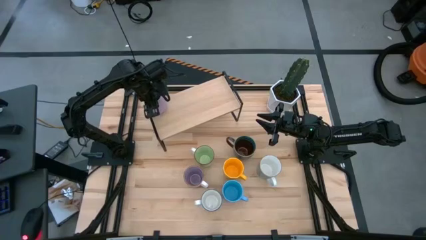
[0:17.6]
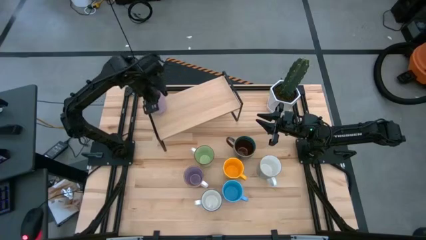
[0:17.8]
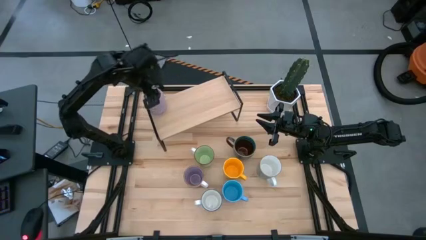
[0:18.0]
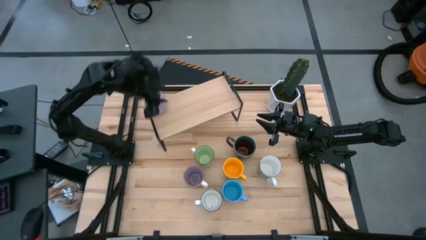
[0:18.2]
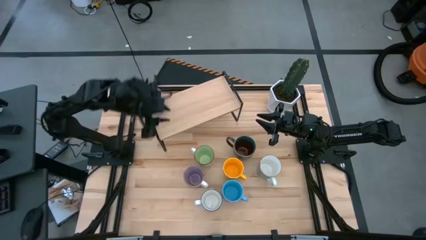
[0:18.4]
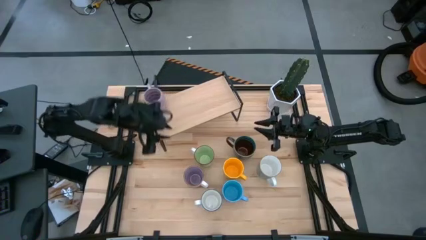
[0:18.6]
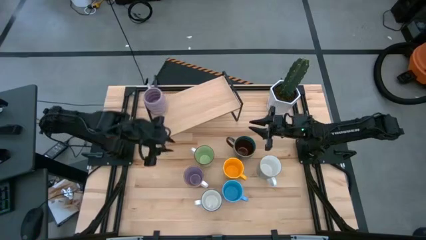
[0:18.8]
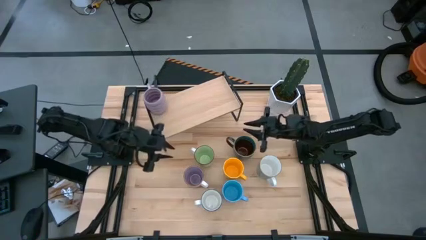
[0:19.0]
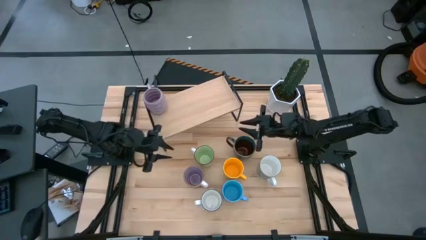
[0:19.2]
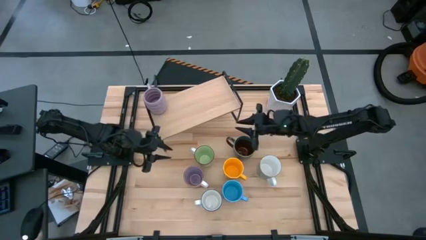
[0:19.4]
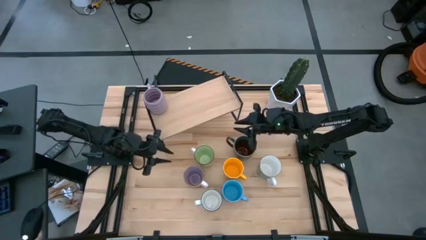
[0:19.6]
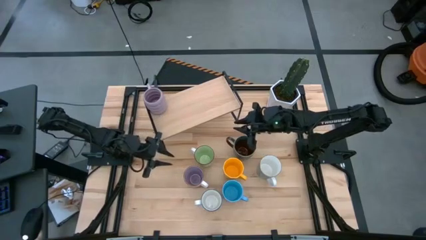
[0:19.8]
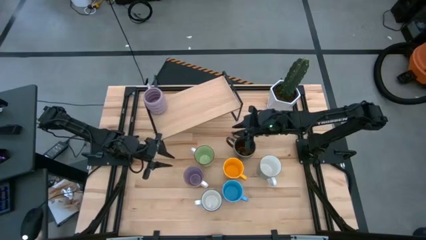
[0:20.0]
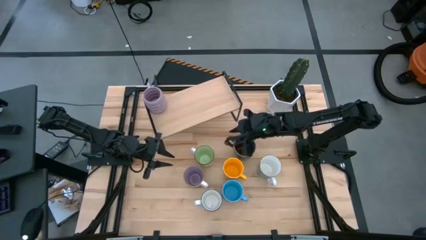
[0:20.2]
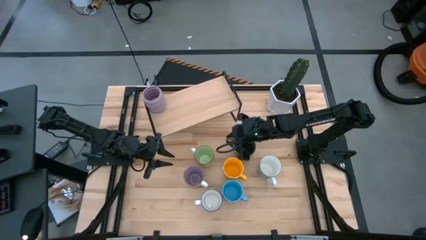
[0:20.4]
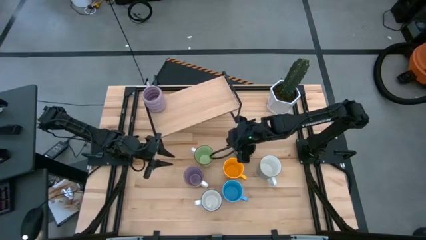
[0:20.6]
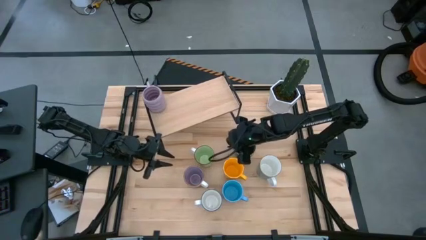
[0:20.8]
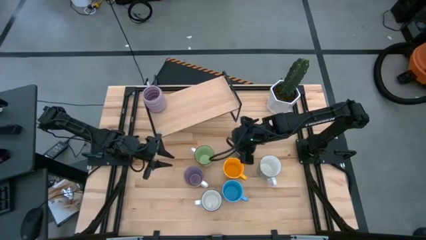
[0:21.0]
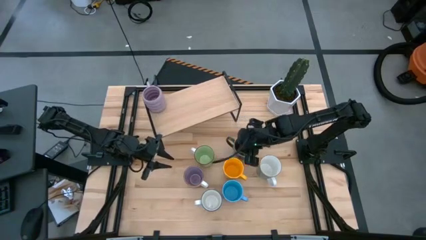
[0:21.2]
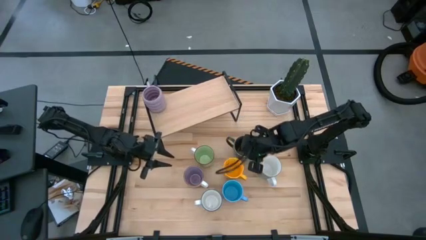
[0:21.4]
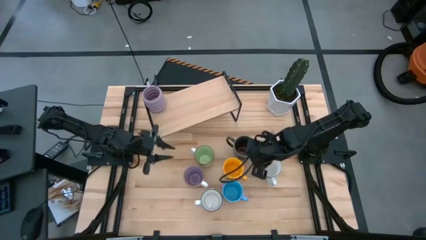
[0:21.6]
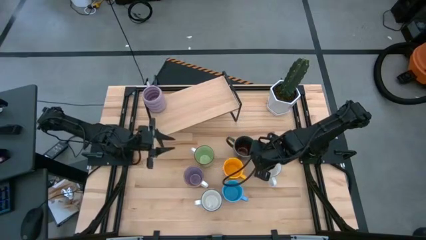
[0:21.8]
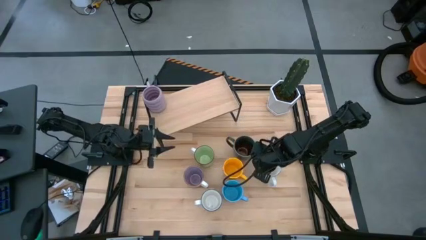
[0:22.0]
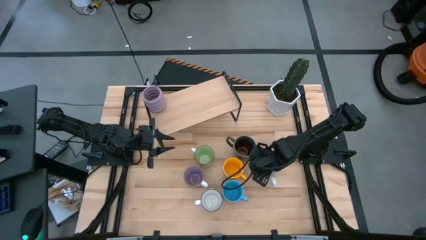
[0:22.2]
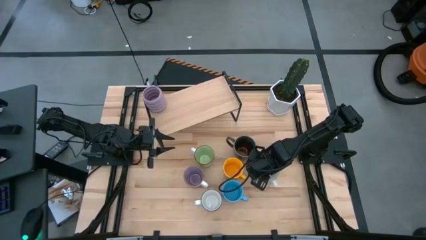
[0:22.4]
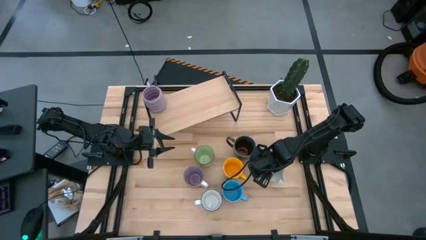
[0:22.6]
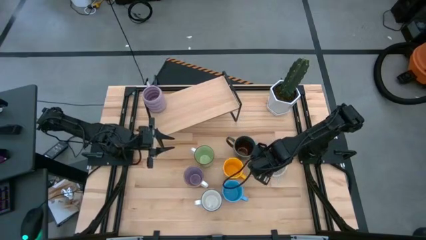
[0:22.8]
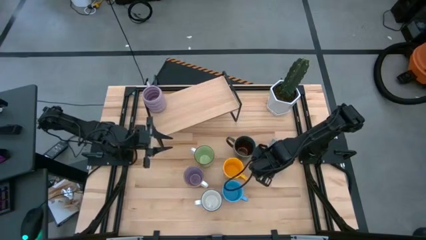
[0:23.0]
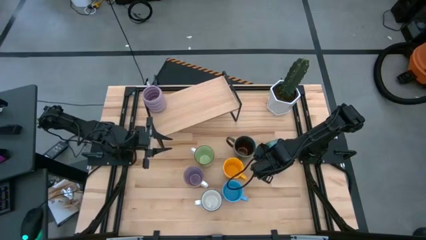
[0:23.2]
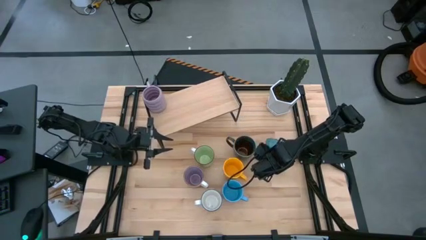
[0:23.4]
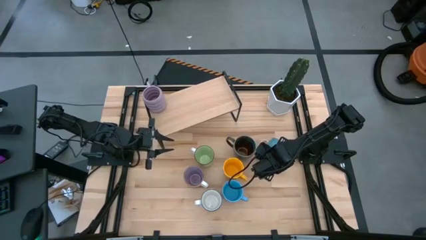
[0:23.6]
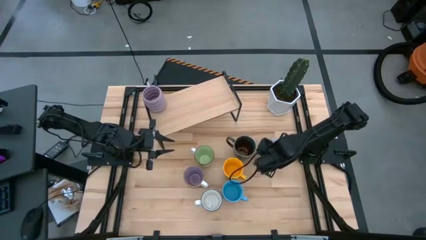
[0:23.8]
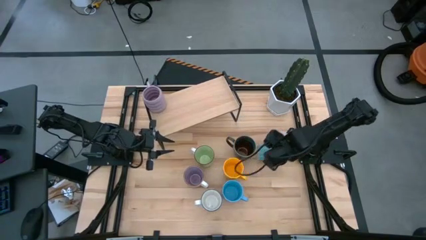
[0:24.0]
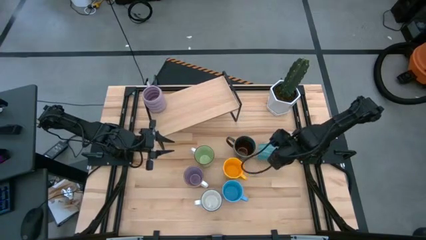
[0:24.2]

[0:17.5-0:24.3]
Task: Place coffee mugs
Adjust the blue-green mug on the table

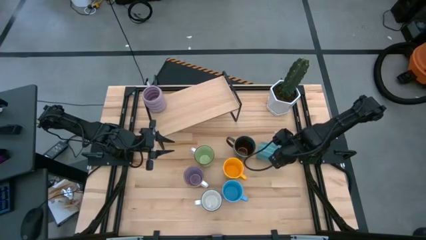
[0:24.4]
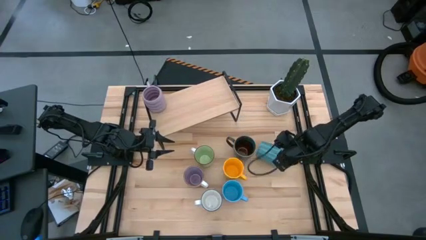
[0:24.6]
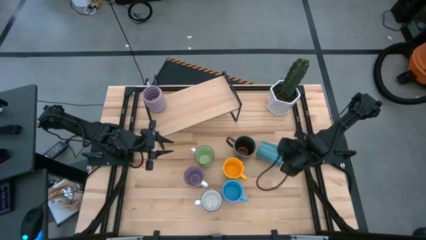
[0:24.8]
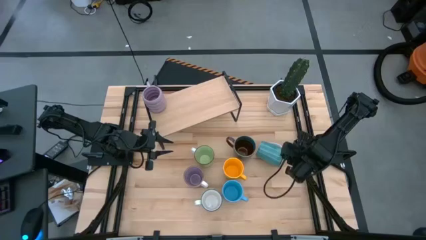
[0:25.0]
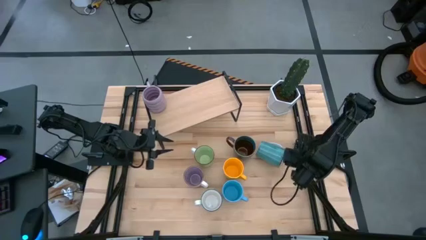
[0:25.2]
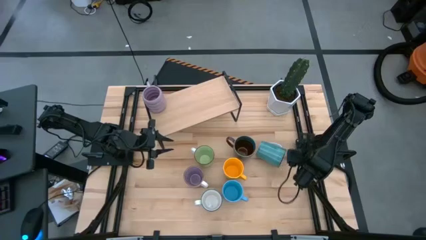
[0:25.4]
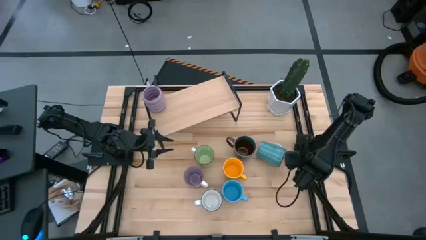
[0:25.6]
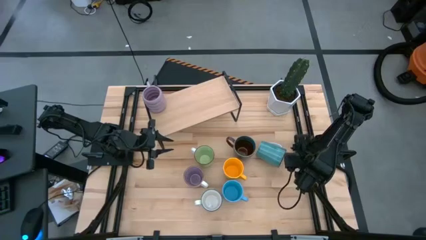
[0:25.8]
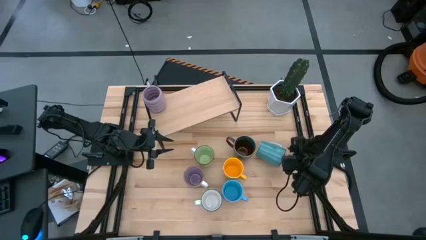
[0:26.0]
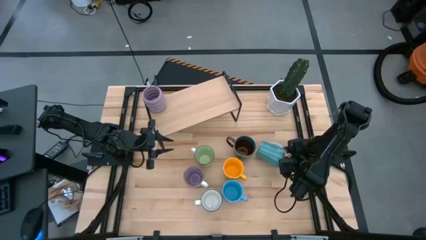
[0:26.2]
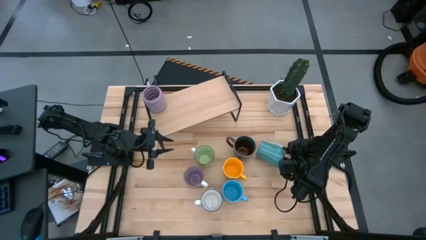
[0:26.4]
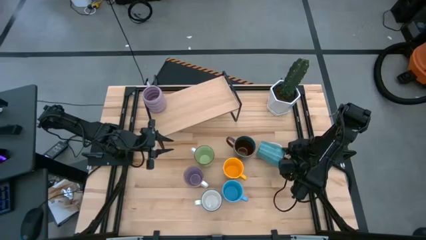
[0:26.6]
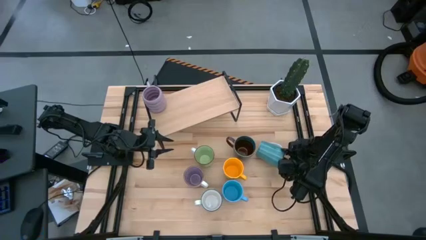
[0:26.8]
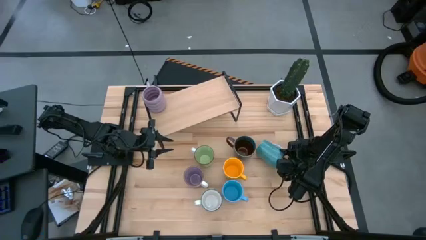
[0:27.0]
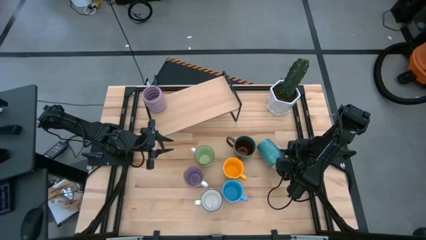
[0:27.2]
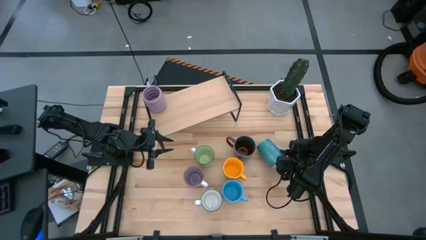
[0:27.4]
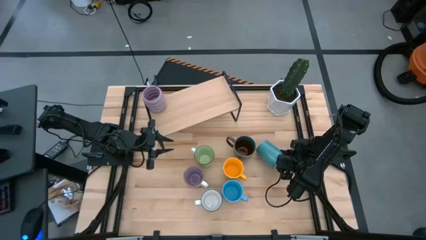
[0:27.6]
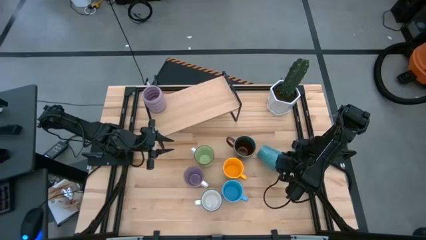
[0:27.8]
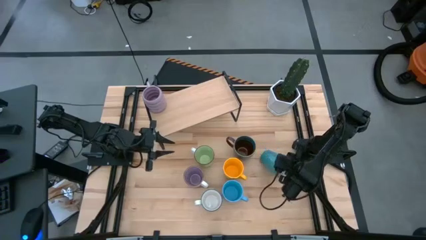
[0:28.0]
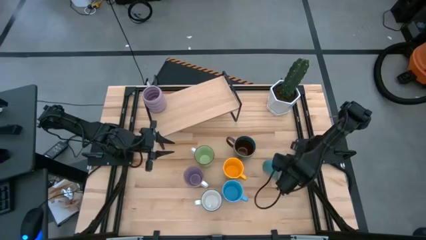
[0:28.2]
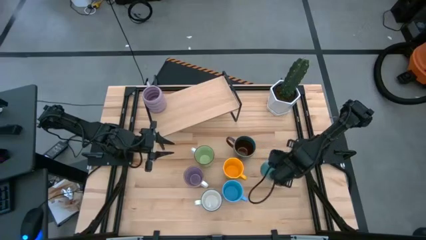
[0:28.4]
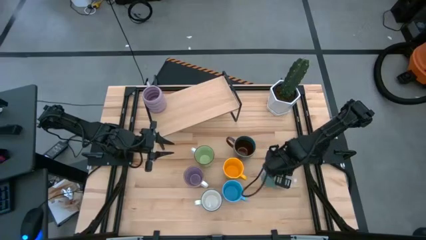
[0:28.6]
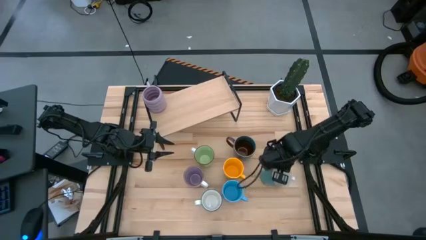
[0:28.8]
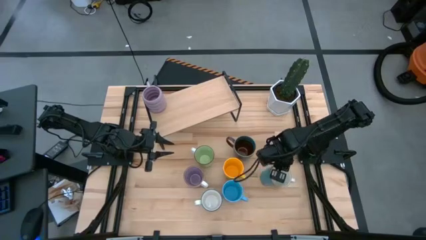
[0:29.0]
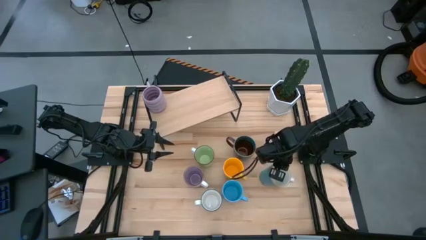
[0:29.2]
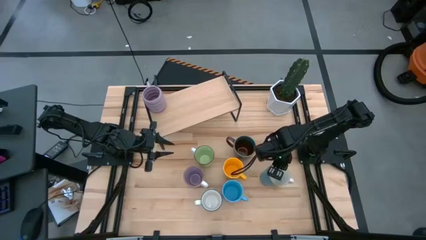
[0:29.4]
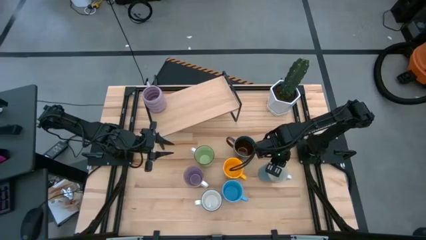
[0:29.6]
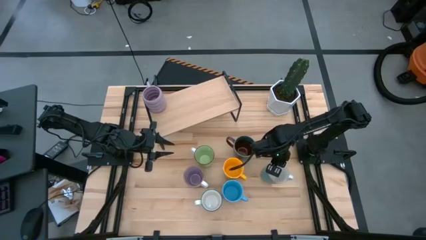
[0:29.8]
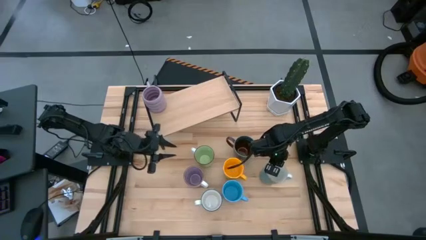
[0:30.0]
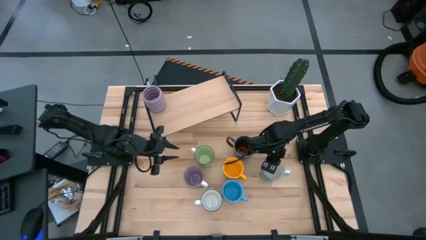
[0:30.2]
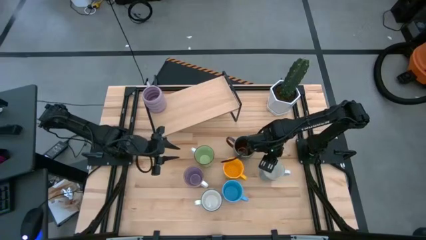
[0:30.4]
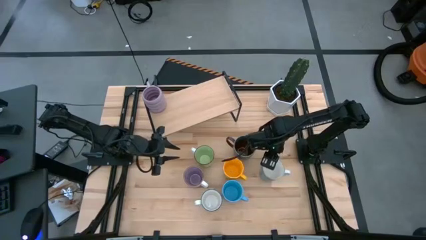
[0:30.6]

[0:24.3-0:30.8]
Adjust the blue-green mug on the table
